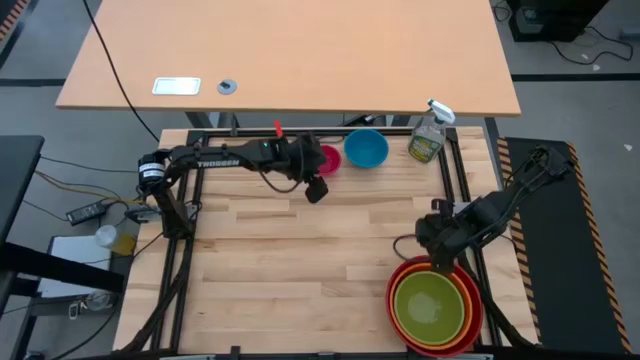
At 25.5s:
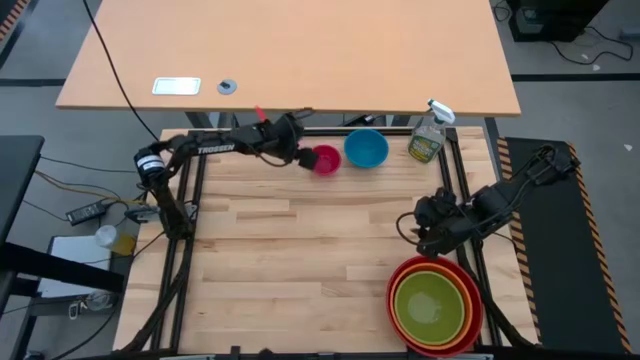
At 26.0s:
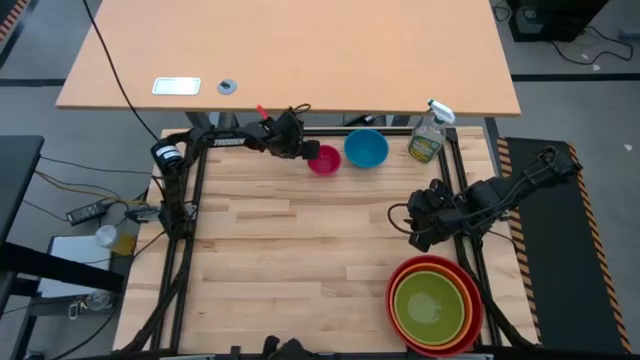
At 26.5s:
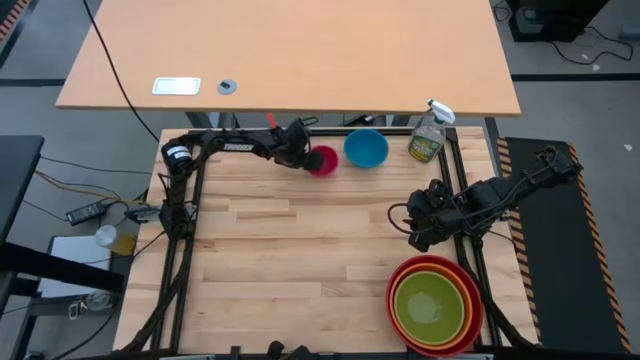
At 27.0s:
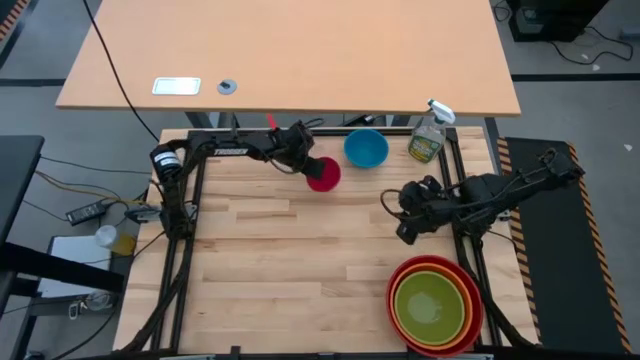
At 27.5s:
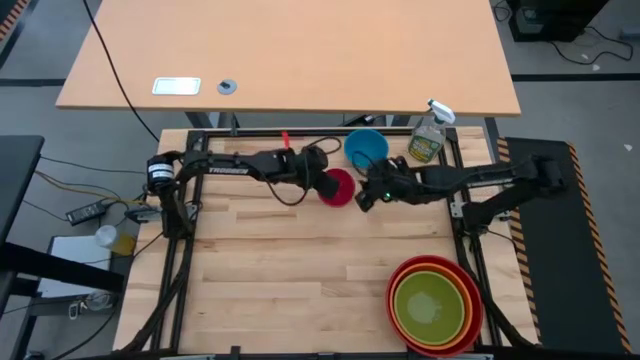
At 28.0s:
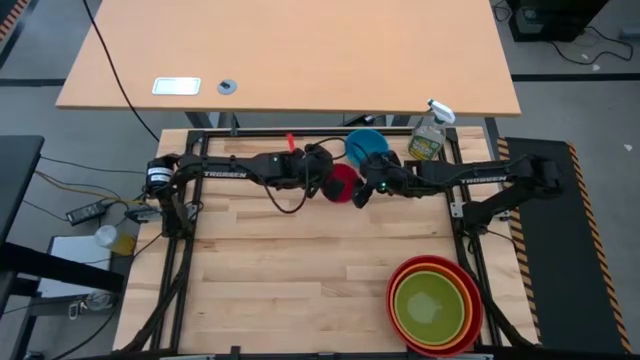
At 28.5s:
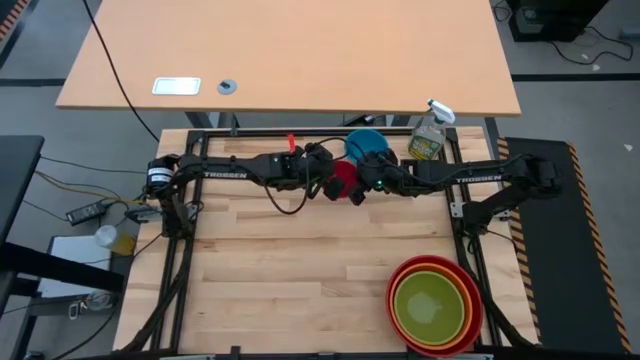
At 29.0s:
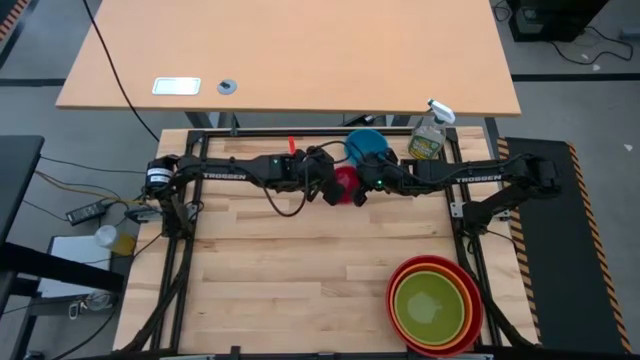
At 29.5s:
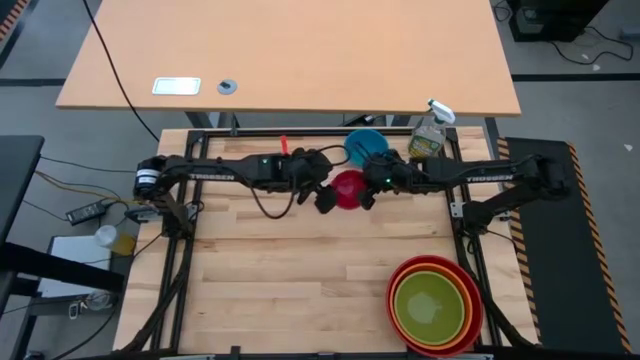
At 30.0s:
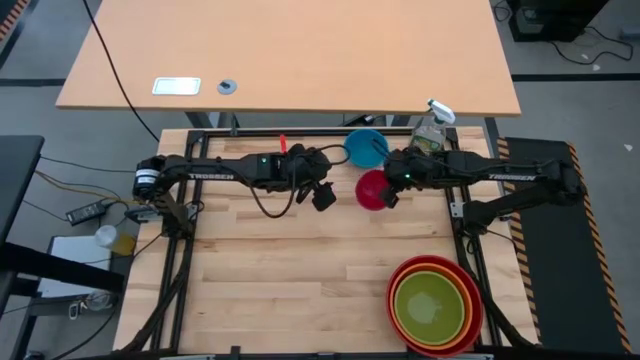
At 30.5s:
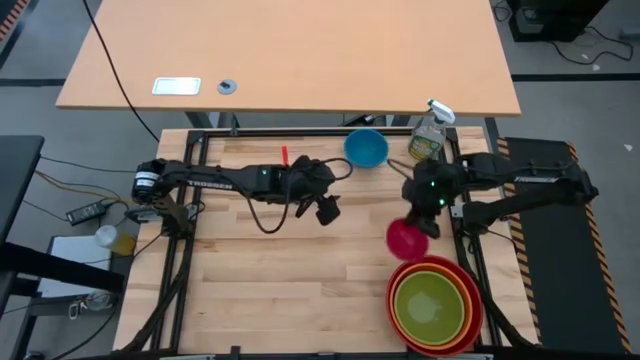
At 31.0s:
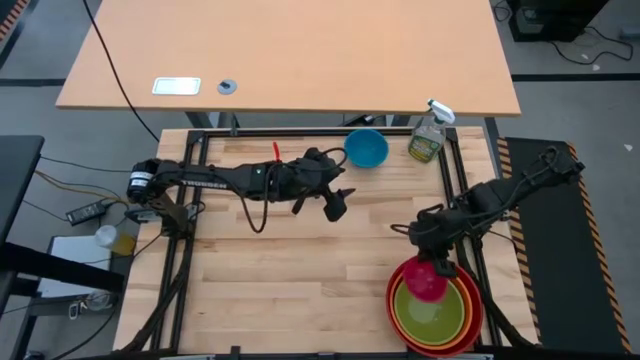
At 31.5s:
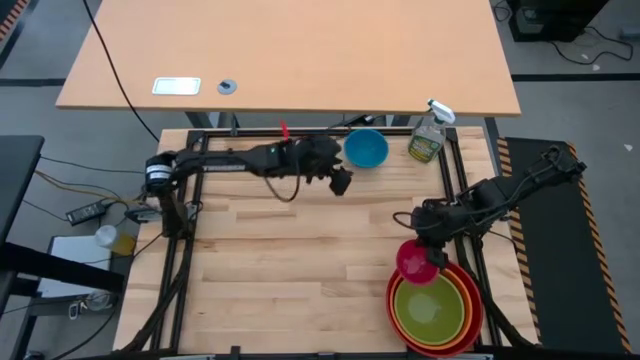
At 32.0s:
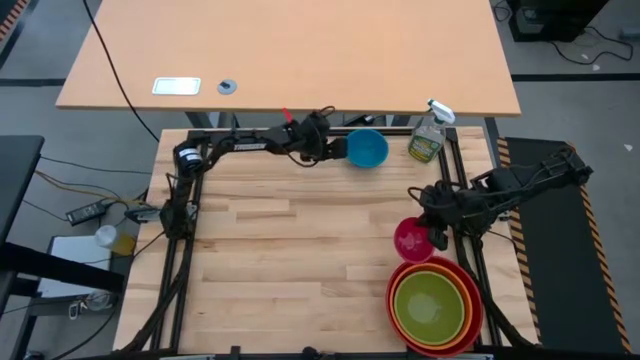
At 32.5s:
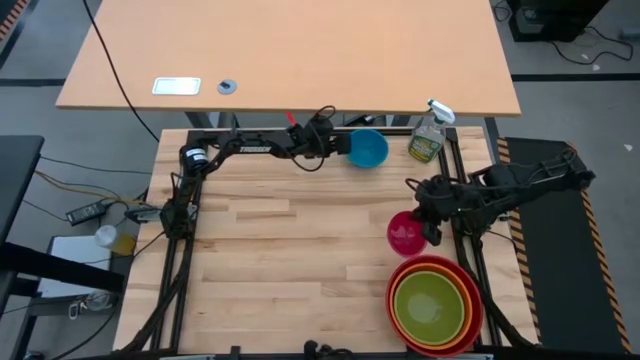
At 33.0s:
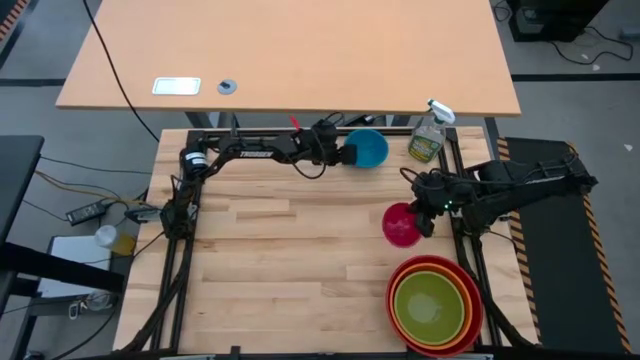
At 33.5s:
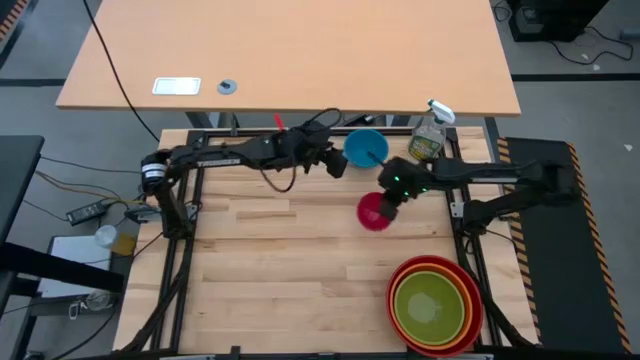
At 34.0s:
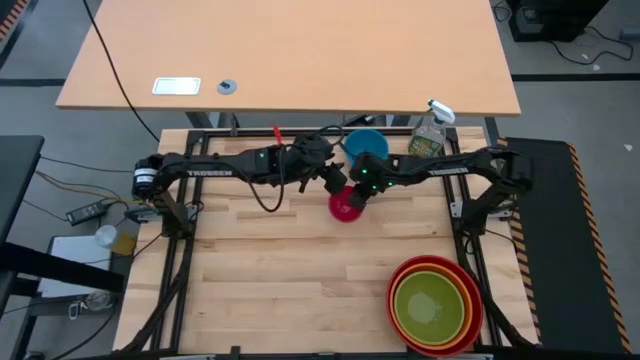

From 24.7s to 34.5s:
Stack the pink bowl into the green bowl

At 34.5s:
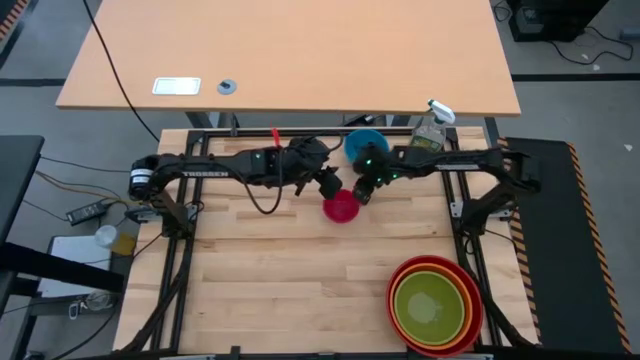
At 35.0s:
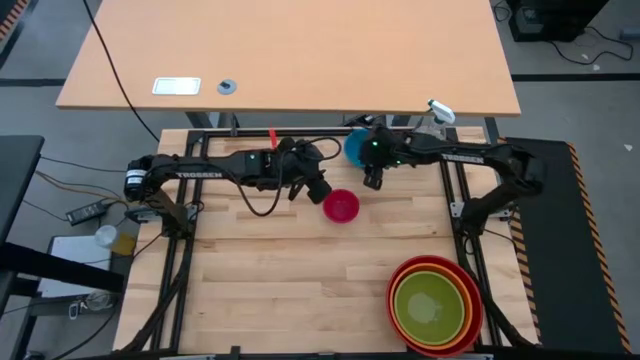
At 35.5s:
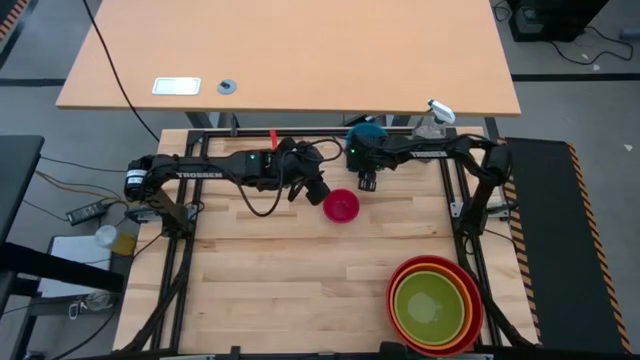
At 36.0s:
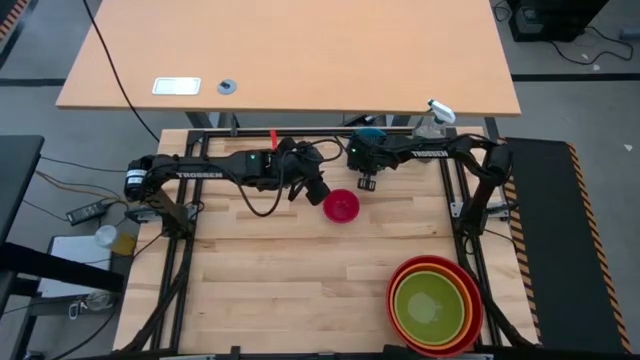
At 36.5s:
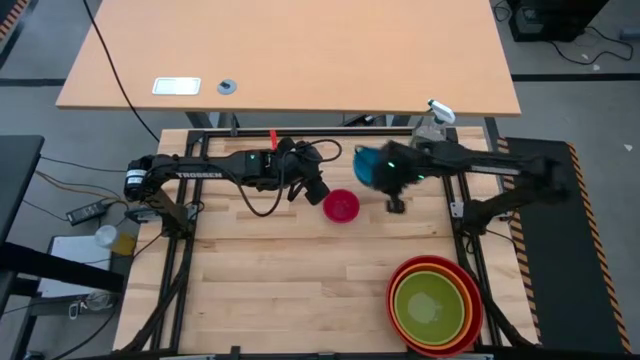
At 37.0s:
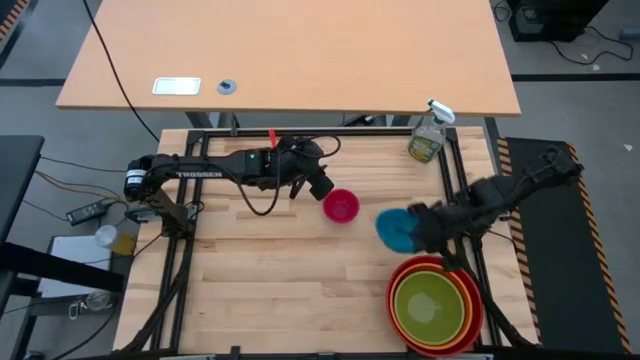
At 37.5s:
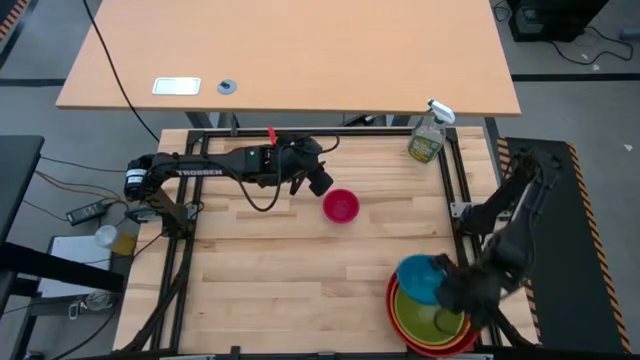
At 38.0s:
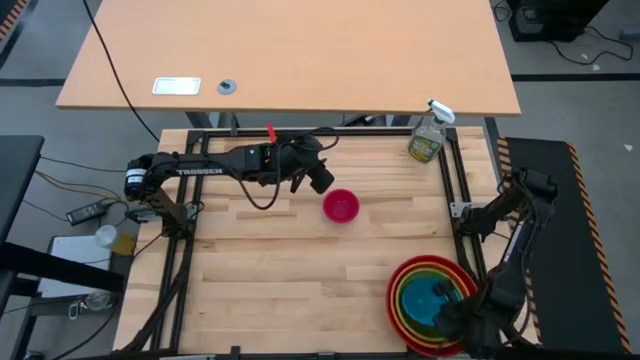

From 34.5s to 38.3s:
Stack the blue bowl into the green bowl

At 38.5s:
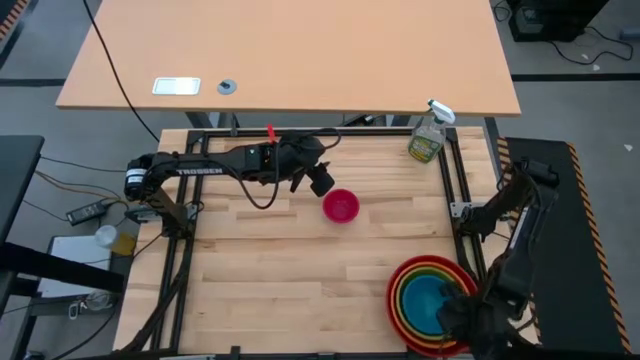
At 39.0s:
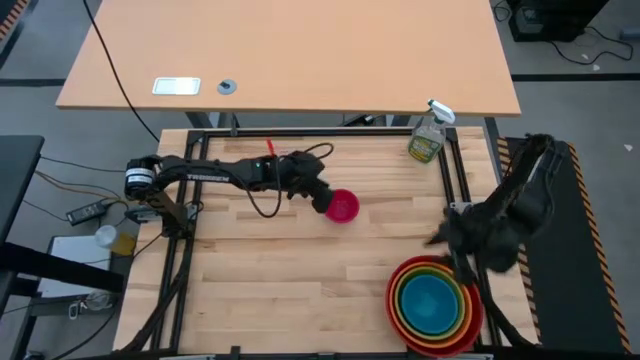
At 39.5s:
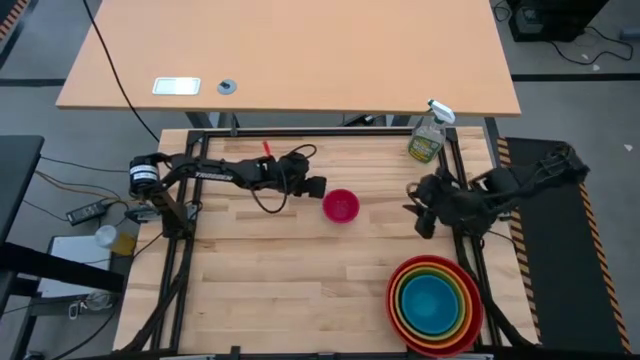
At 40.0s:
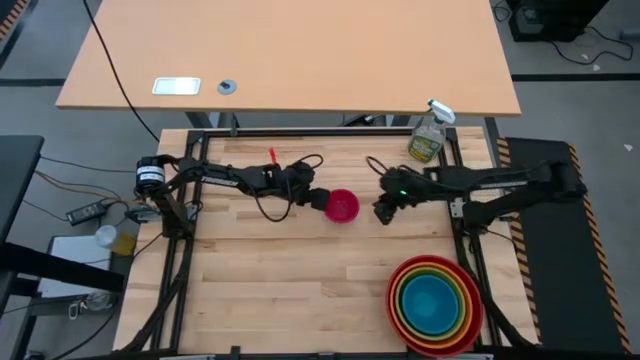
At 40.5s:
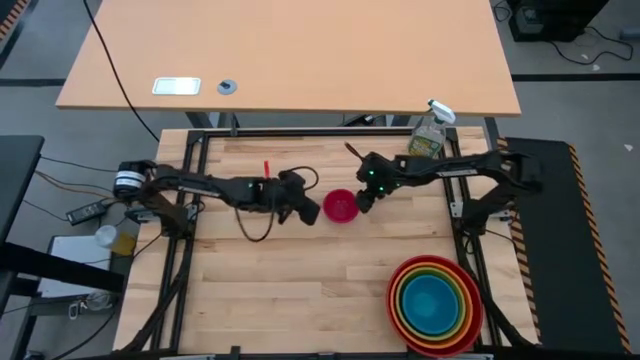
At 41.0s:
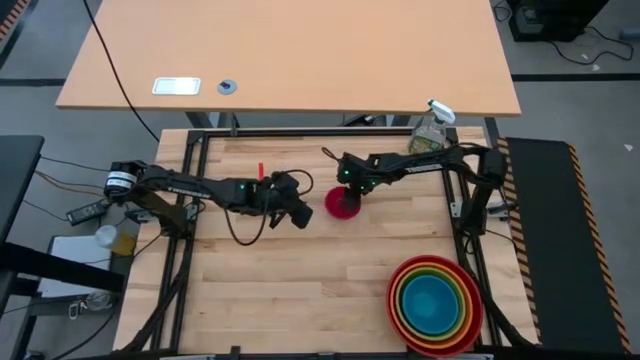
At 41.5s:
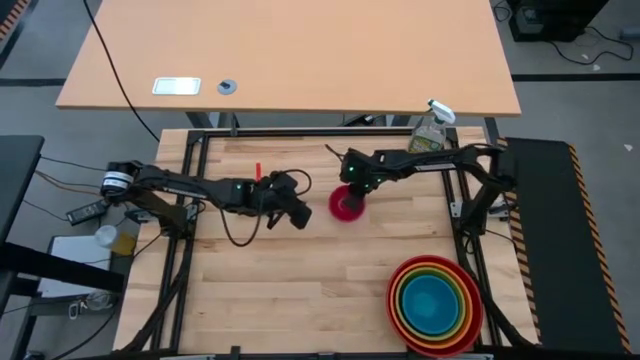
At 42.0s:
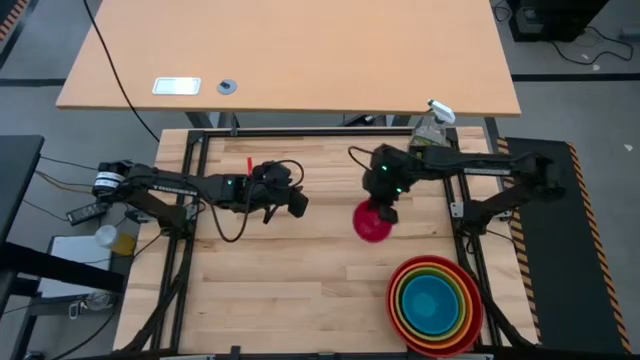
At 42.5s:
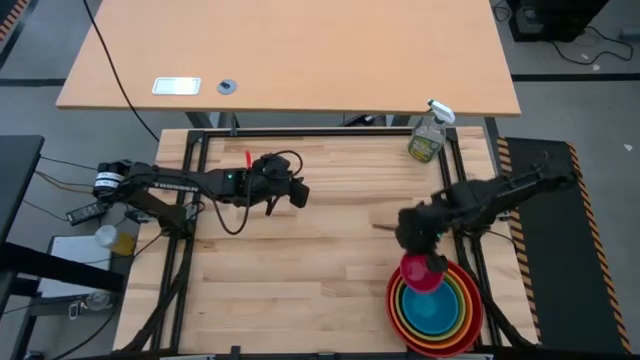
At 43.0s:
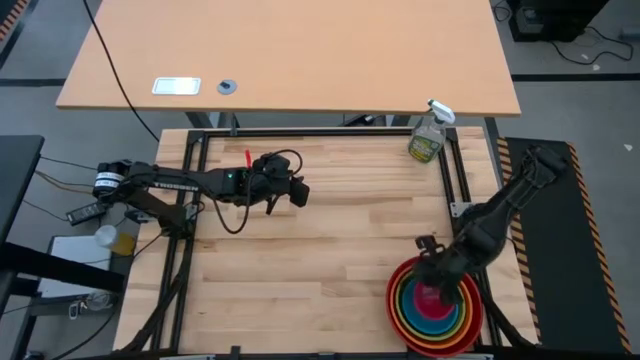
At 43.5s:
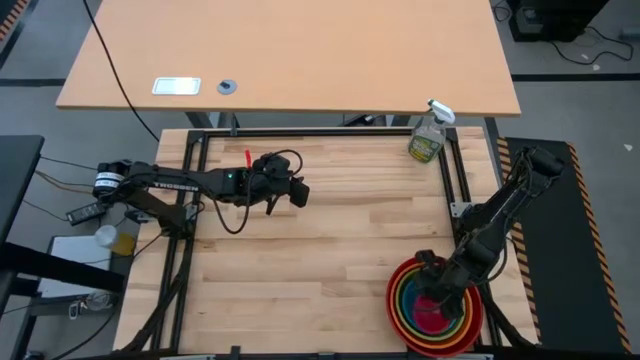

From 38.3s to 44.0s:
Stack the pink bowl into the blue bowl

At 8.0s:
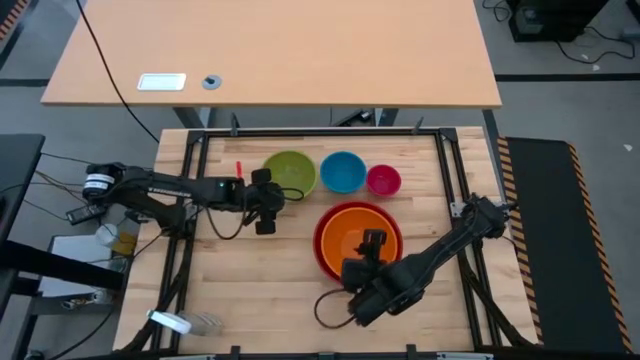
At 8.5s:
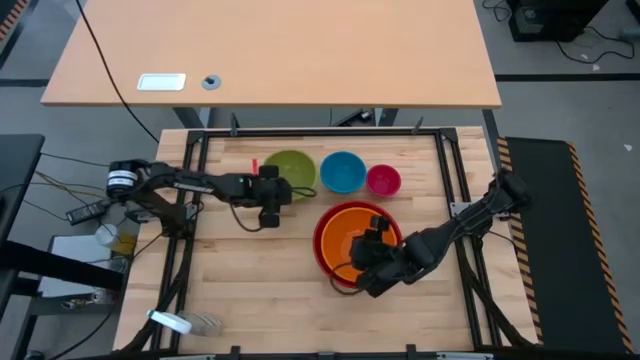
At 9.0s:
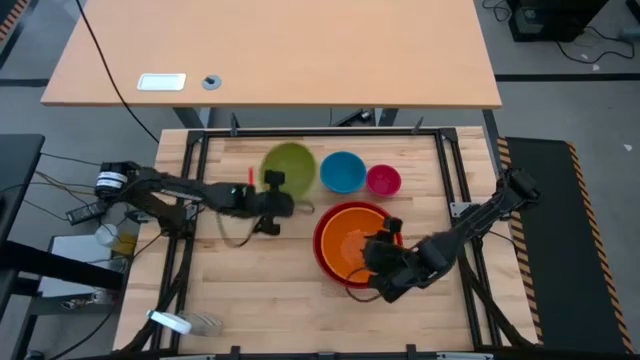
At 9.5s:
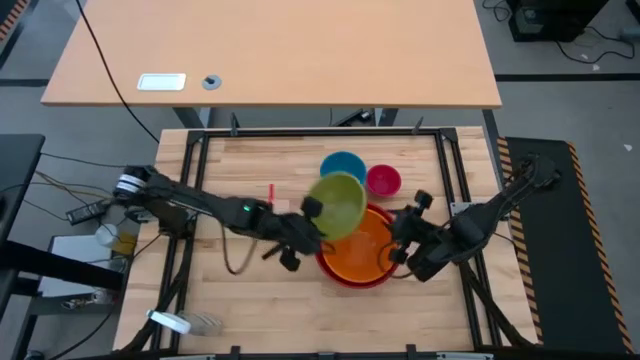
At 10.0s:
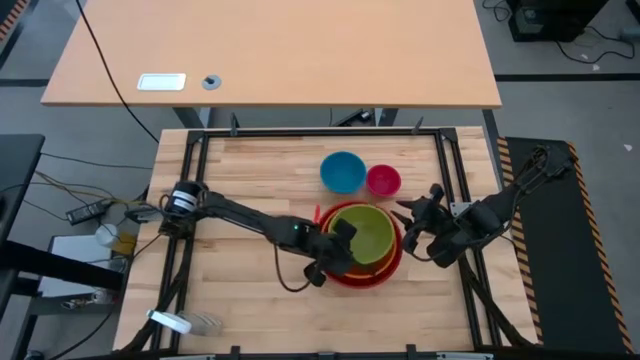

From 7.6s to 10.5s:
Stack the green bowl on top of the orange bowl
